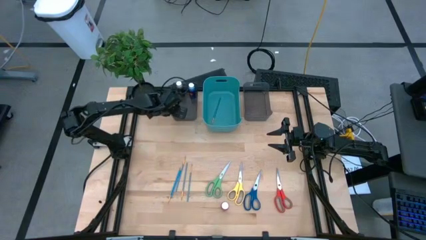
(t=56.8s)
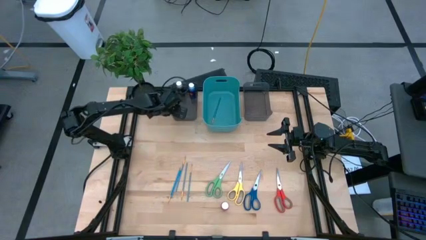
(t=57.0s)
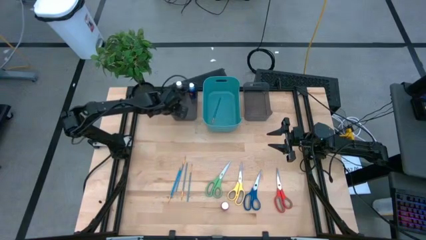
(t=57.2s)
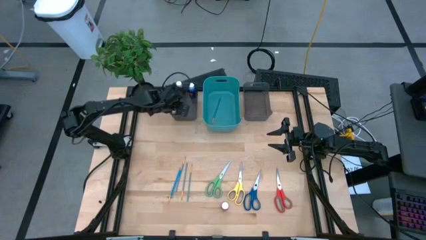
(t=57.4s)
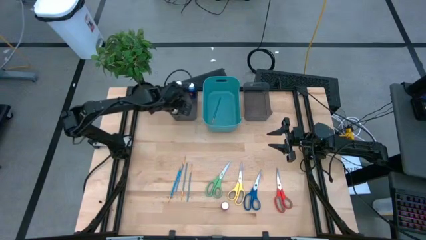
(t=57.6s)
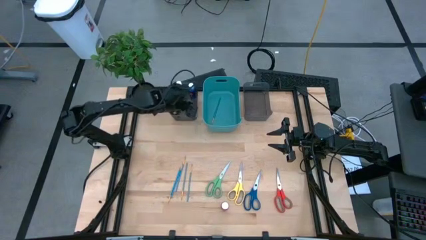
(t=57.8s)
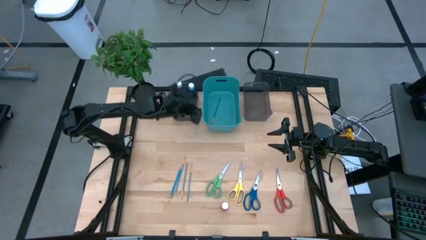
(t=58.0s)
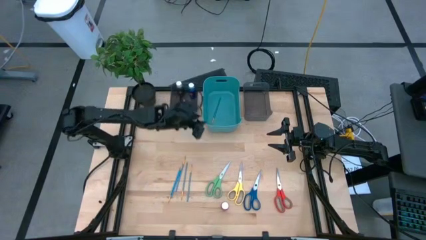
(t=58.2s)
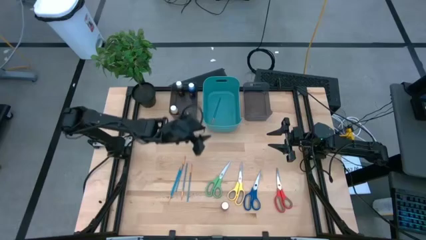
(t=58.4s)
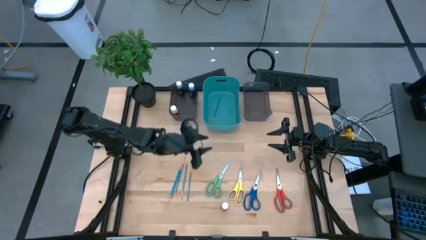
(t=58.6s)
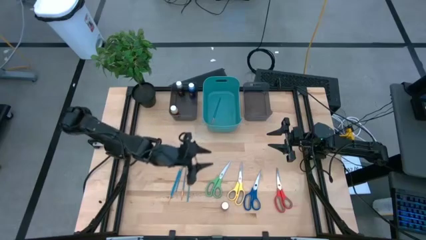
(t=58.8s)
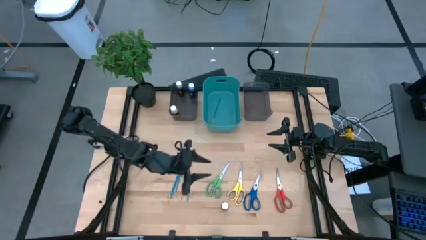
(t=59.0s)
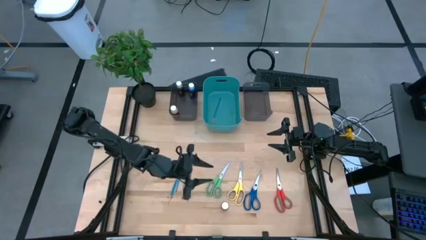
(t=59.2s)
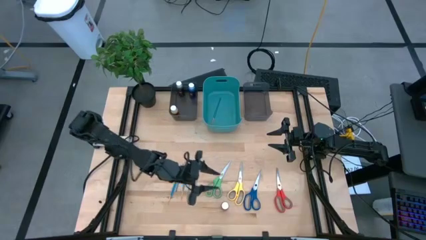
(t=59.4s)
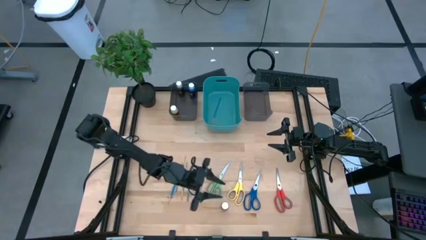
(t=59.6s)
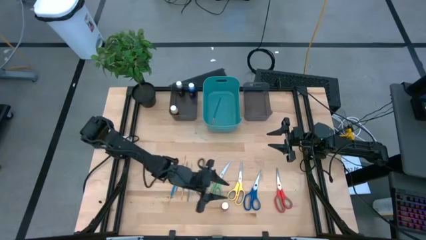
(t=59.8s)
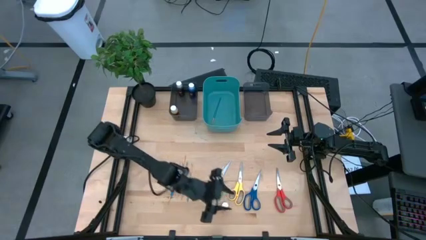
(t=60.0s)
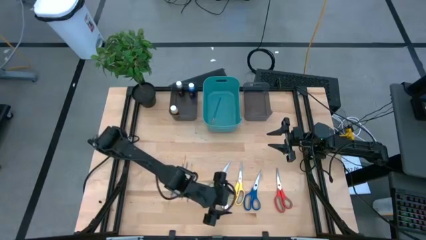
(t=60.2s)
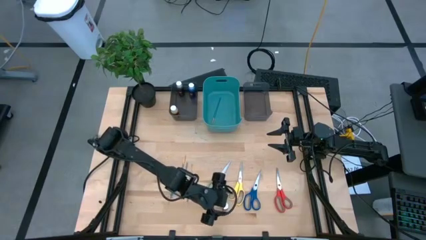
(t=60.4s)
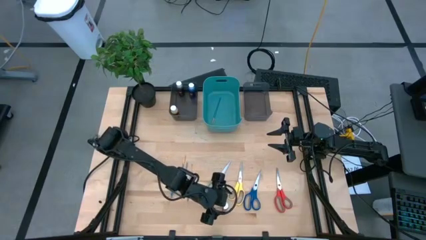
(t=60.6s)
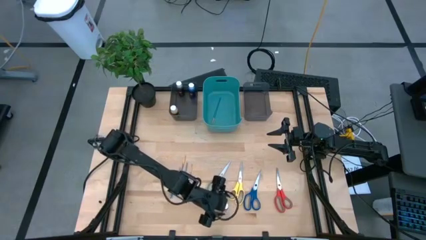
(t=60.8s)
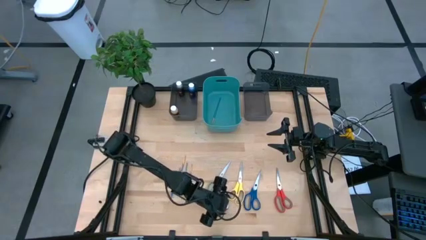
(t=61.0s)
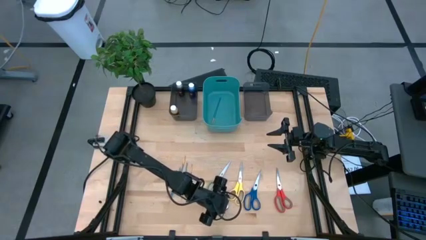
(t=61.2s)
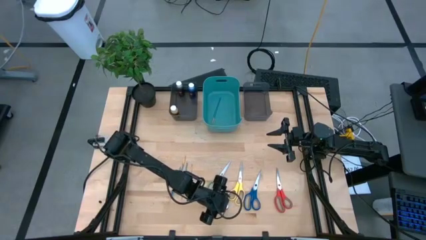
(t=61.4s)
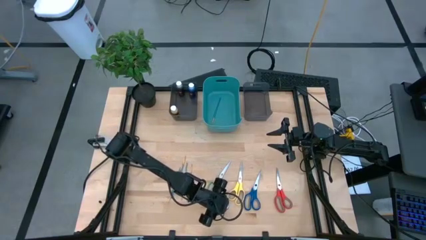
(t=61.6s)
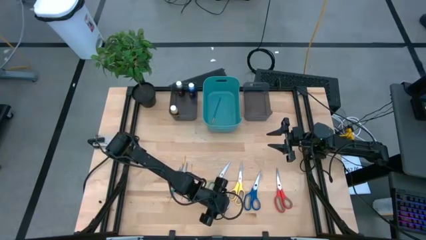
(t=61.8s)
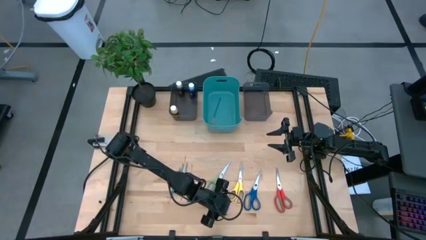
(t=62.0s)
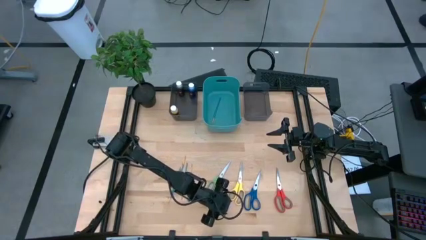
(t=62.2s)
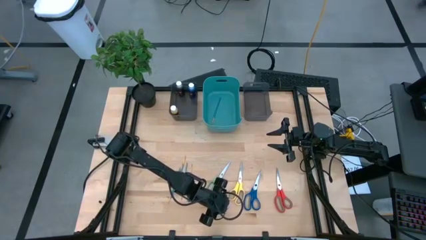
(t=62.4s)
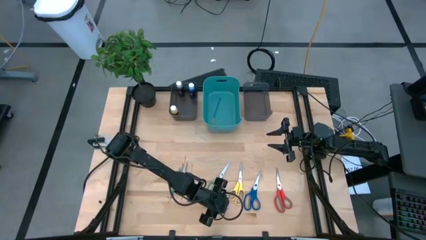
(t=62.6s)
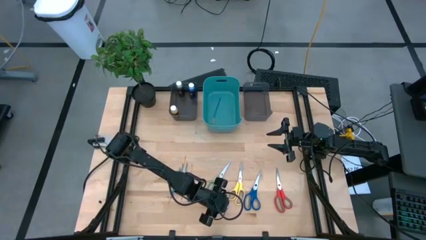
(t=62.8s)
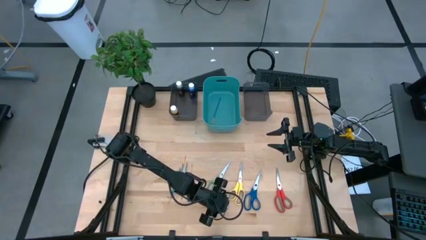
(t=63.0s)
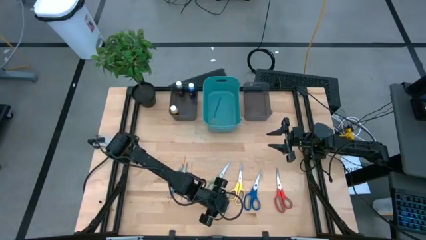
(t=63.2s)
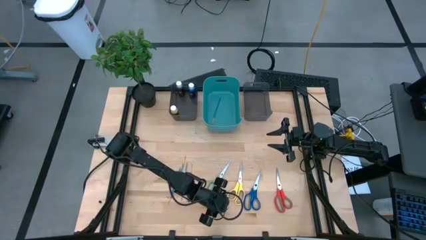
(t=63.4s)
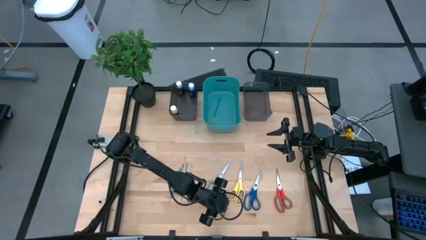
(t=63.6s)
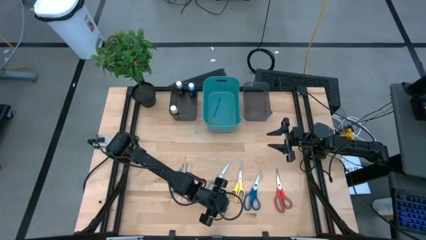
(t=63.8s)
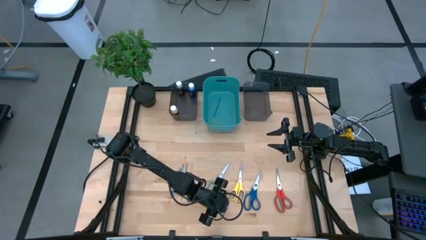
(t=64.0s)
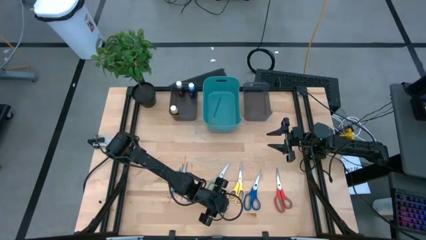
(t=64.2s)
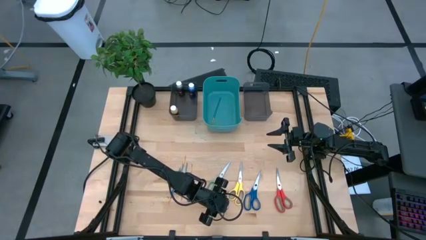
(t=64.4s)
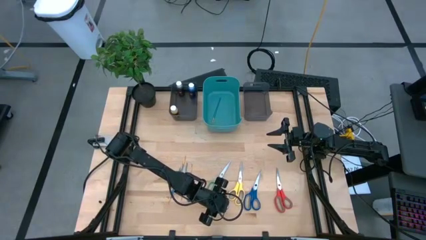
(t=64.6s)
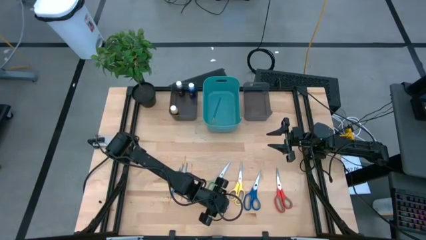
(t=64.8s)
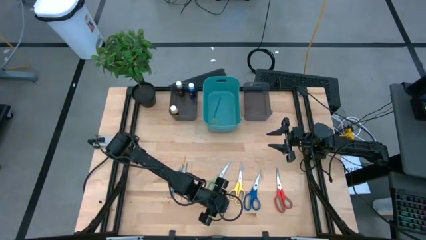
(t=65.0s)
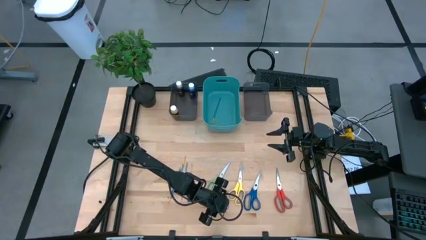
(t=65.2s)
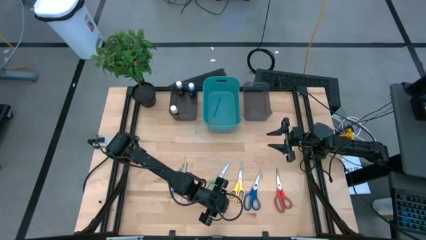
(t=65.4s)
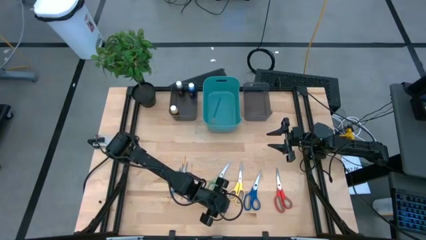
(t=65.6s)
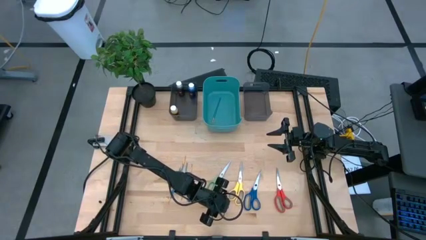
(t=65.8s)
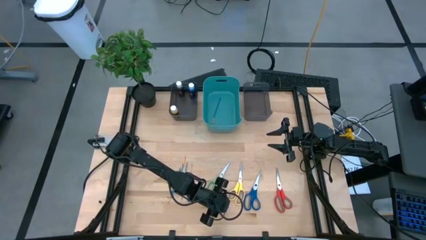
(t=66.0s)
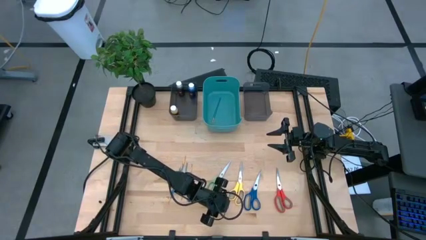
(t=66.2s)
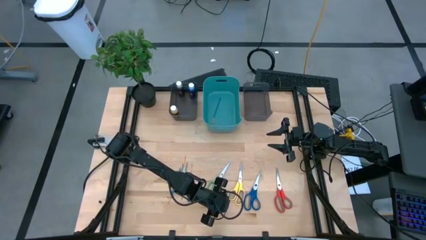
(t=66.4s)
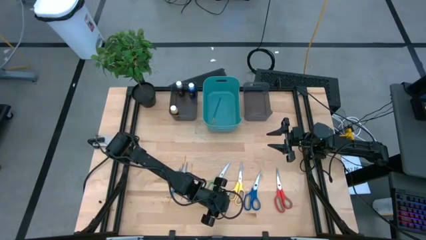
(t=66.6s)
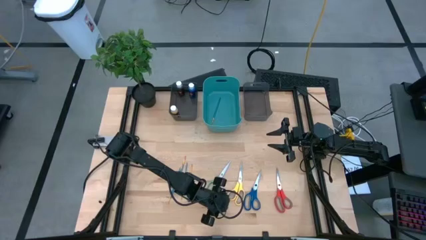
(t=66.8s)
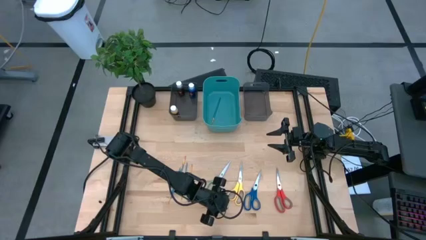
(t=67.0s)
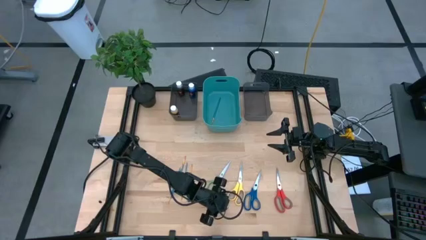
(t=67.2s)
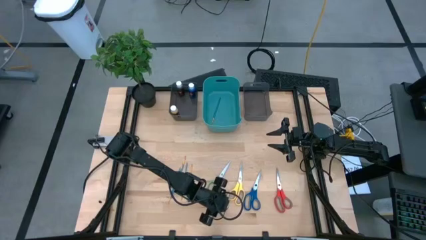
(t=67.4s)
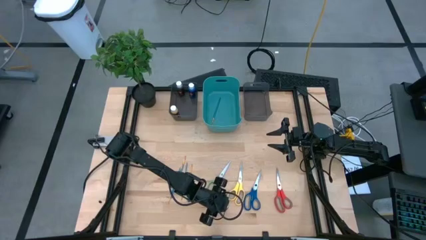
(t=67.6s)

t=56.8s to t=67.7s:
Task: Pick & Place Paint Supplies
Put the pink paint bottle into the left black bin

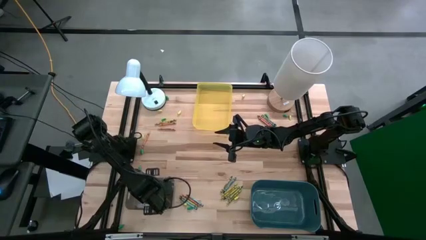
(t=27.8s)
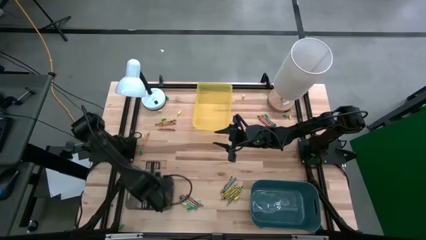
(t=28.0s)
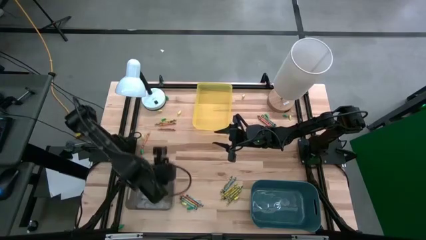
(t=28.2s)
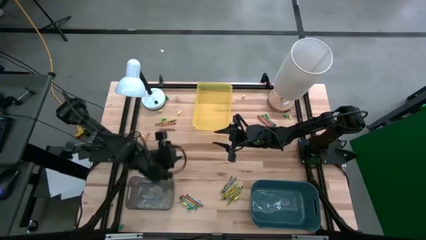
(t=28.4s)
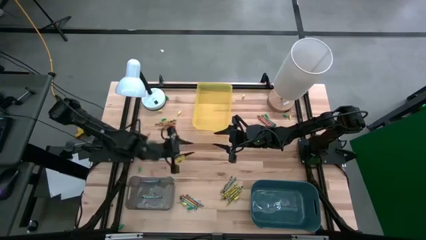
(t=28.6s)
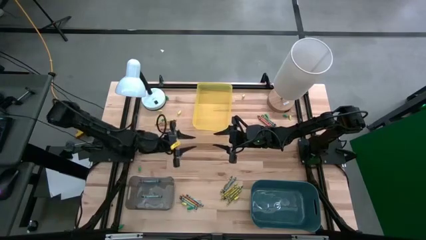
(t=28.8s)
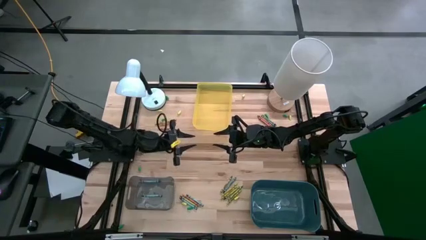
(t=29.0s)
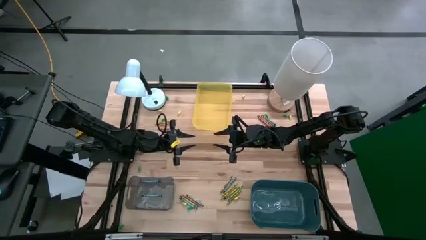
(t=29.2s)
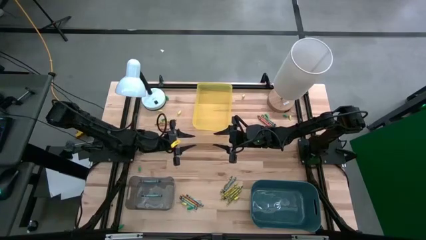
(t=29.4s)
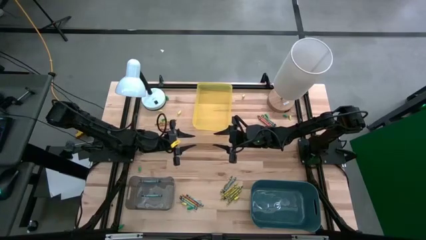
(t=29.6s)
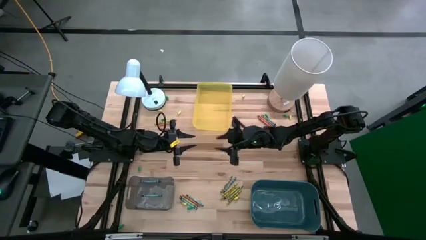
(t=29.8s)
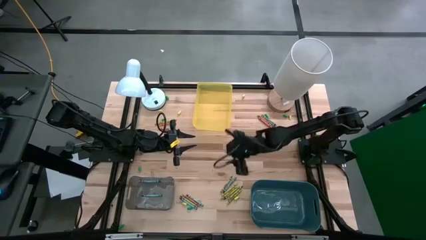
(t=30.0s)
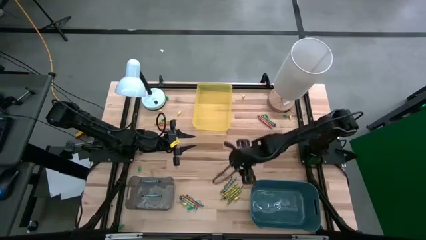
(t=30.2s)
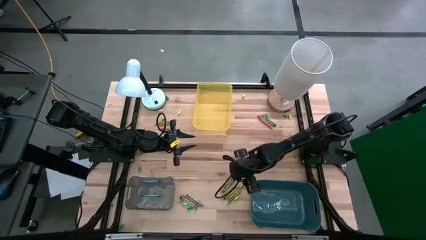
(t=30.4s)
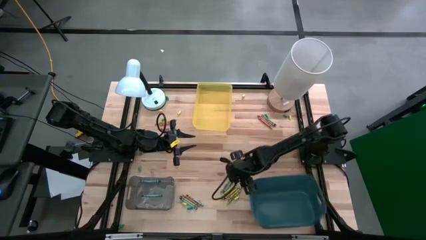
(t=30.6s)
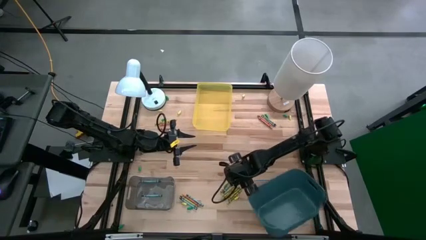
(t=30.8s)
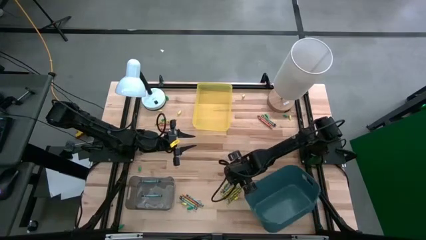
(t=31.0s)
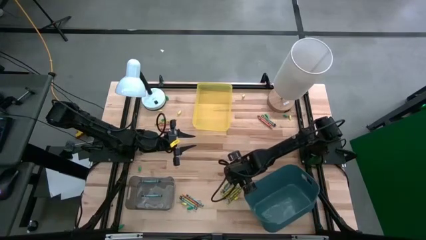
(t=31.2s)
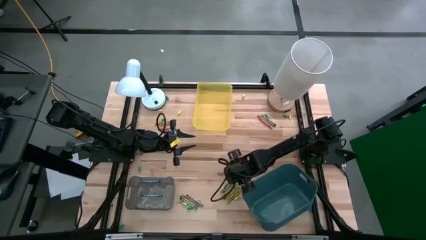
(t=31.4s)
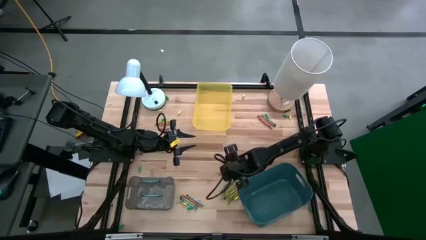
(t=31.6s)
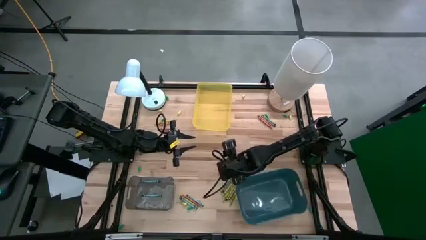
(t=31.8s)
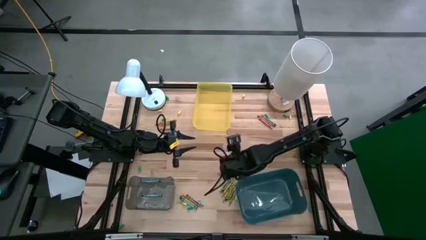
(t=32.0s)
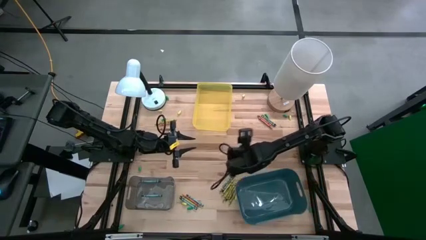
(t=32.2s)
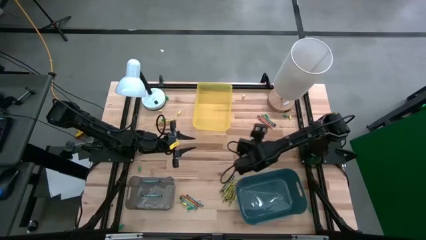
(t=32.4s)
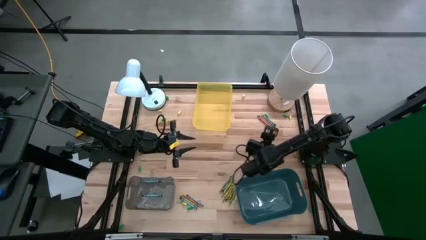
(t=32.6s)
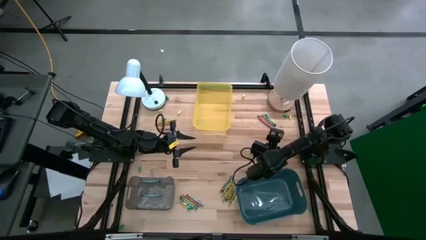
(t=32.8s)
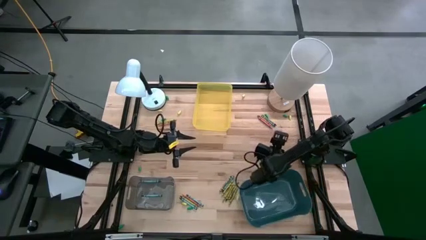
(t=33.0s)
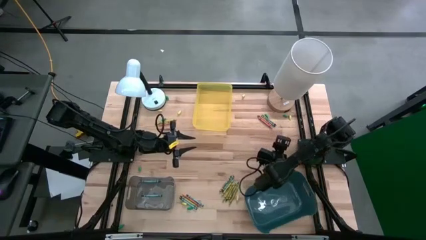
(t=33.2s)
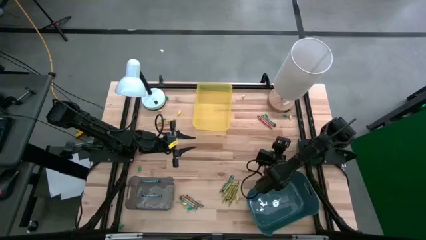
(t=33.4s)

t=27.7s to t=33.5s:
Task: Sort crayons
Adjust the pine green bin

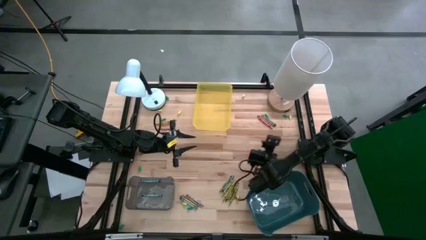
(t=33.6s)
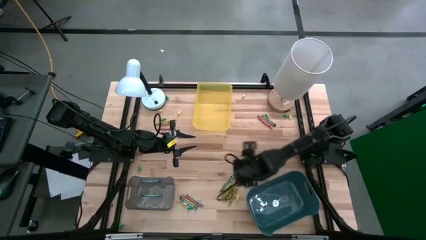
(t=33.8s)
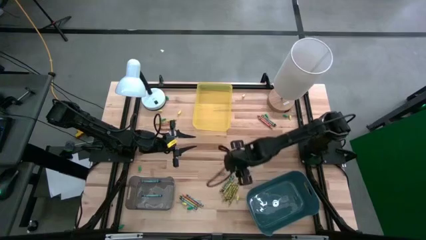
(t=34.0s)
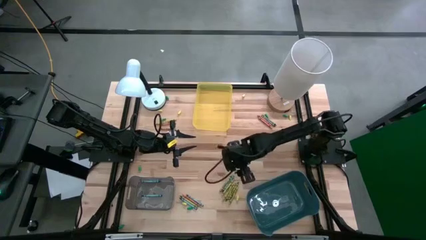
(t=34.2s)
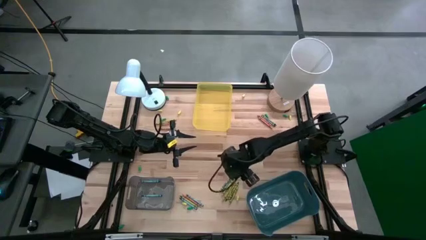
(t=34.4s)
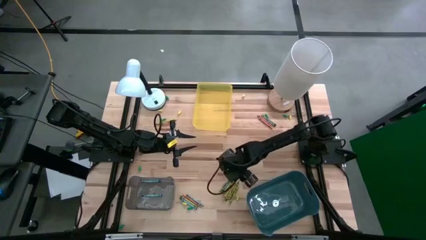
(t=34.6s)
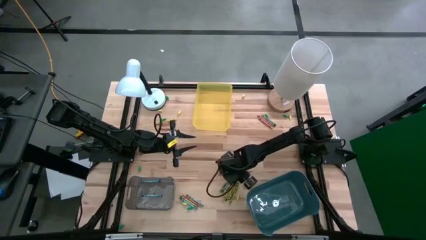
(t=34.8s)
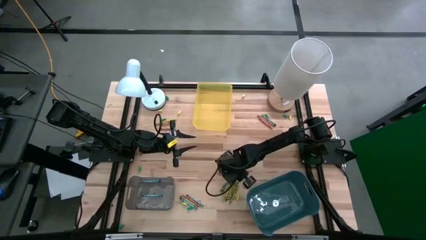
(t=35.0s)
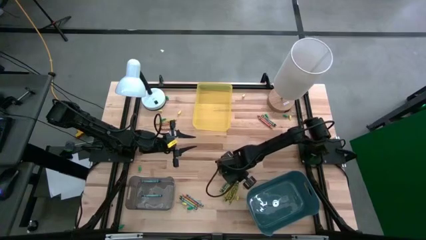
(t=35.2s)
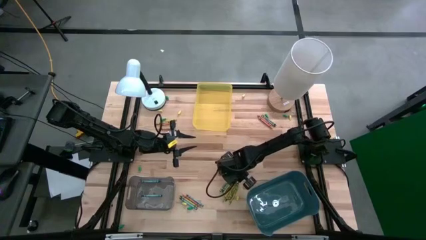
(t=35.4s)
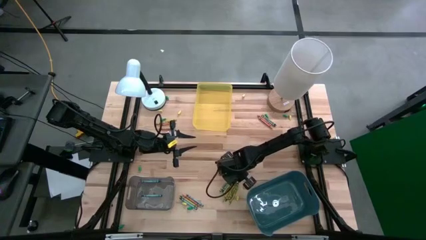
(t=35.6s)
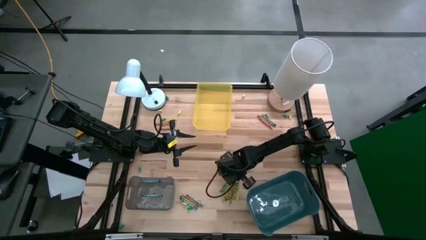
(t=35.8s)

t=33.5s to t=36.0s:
Put the blue crayon into the black bin
